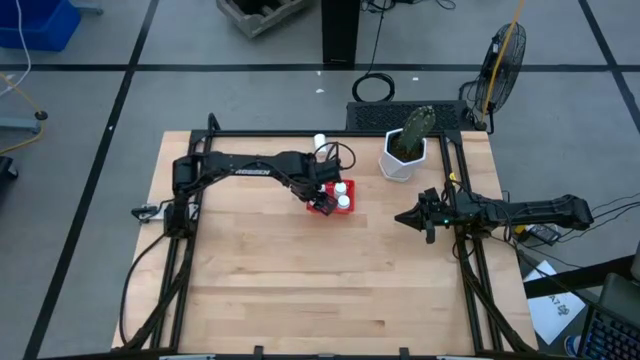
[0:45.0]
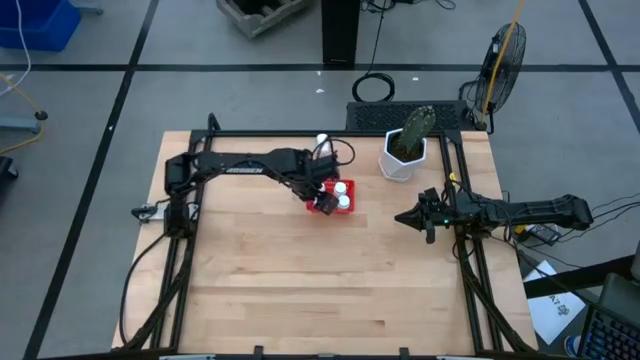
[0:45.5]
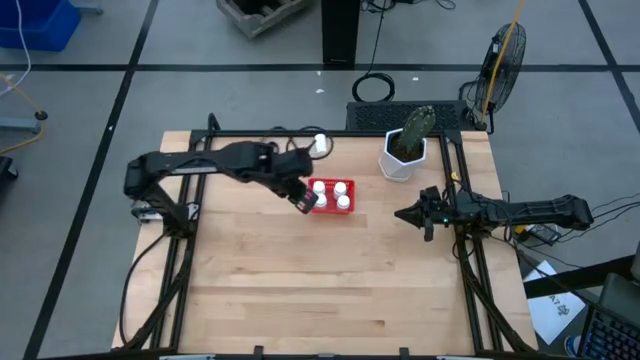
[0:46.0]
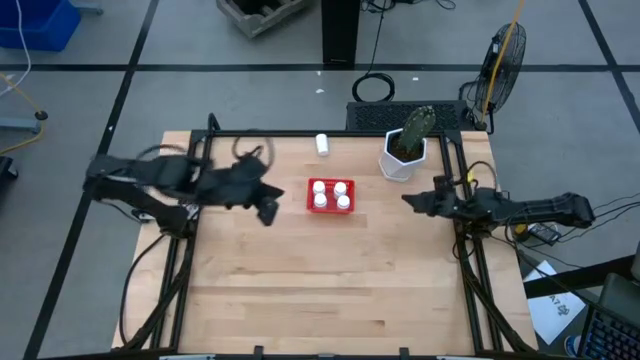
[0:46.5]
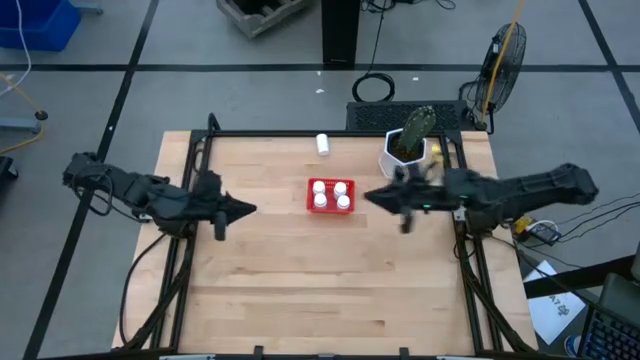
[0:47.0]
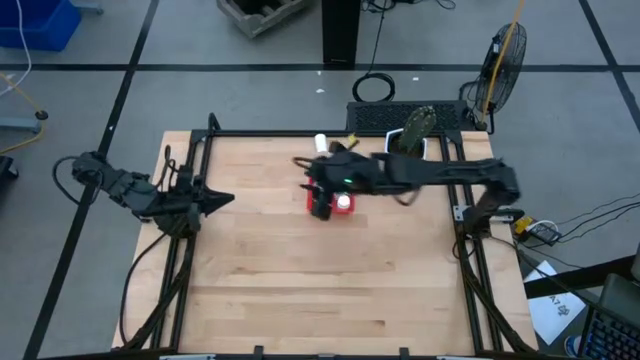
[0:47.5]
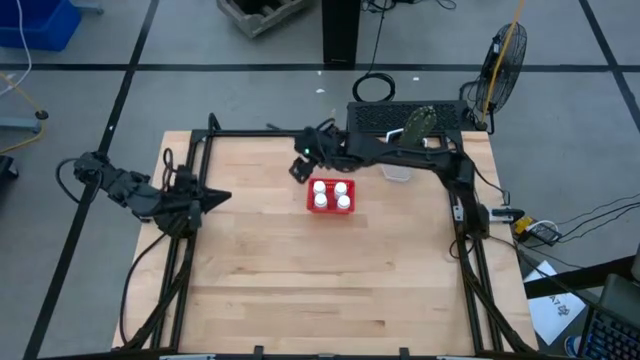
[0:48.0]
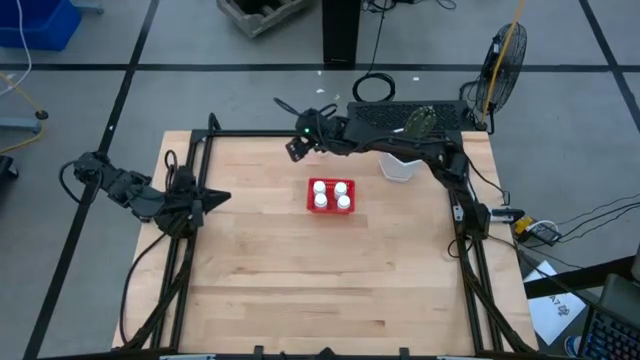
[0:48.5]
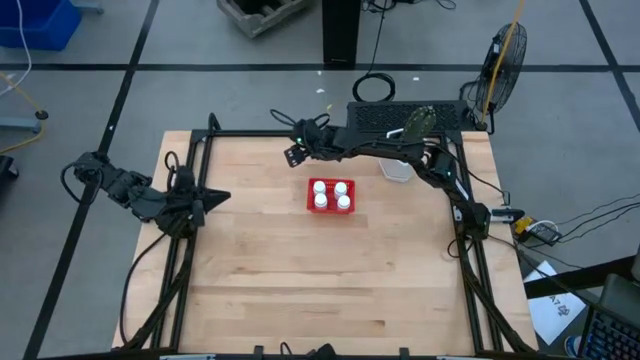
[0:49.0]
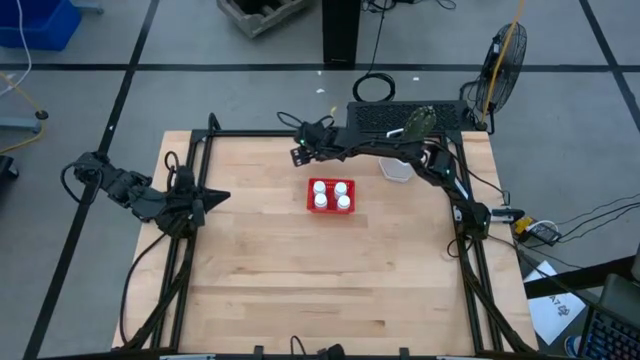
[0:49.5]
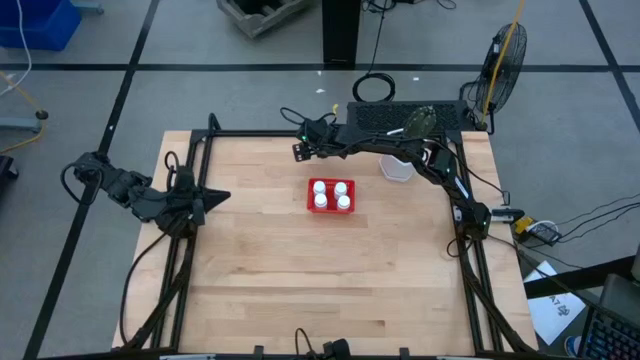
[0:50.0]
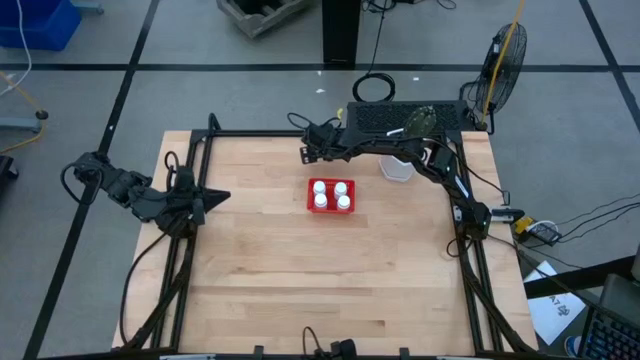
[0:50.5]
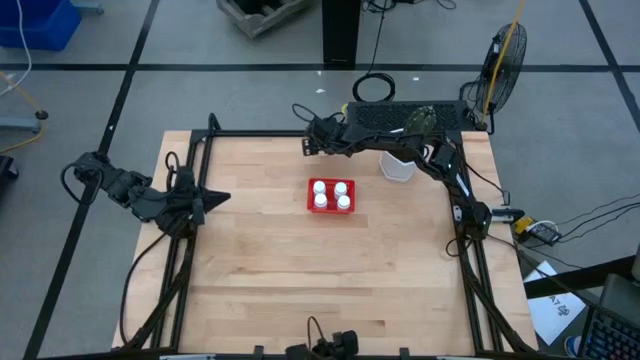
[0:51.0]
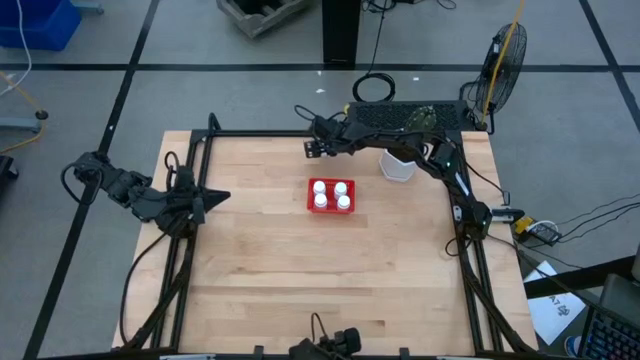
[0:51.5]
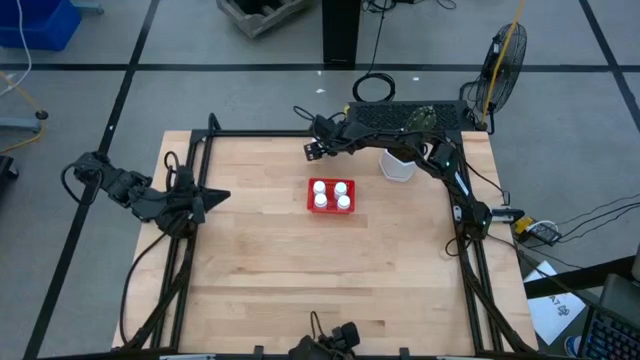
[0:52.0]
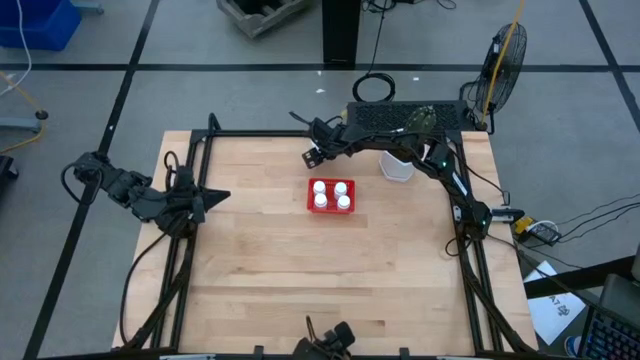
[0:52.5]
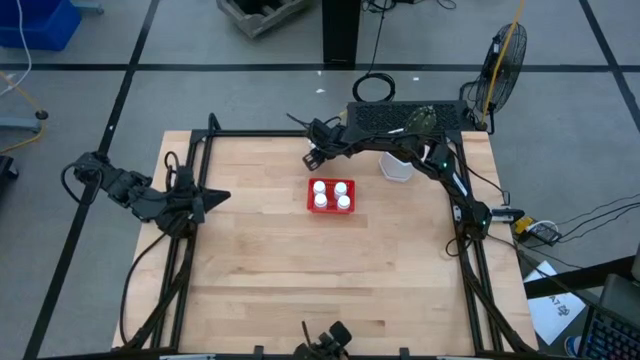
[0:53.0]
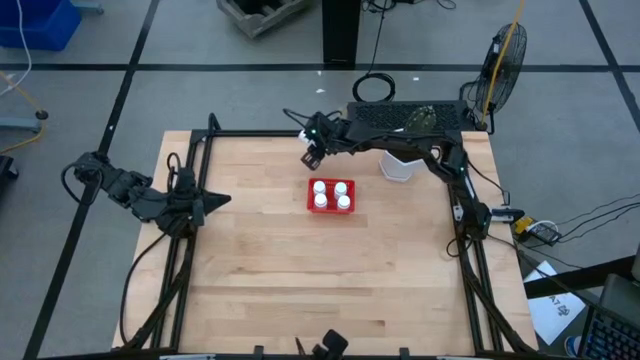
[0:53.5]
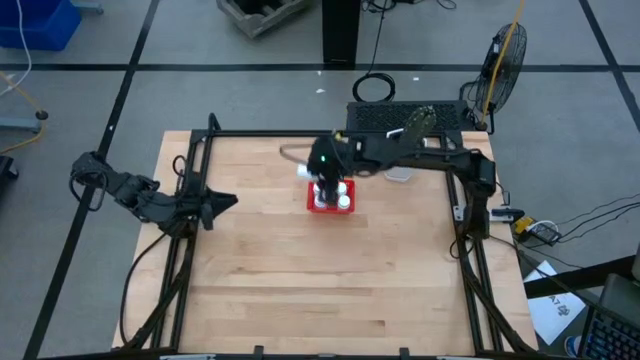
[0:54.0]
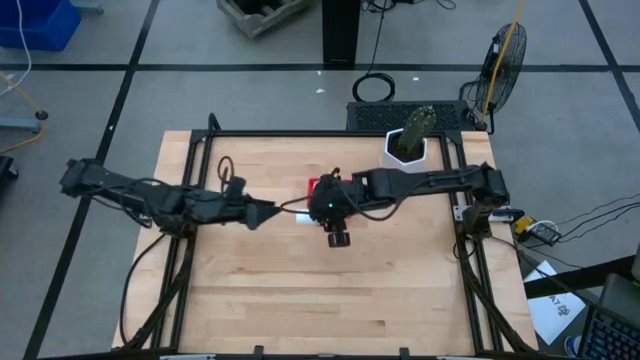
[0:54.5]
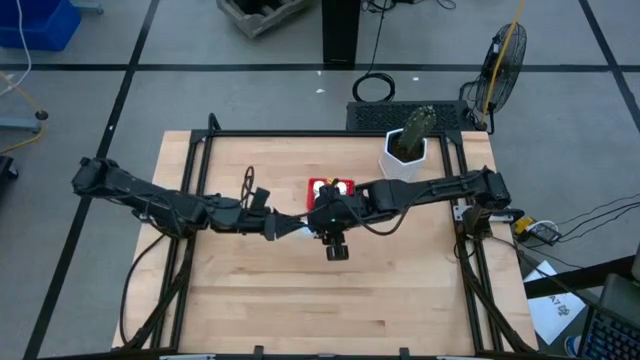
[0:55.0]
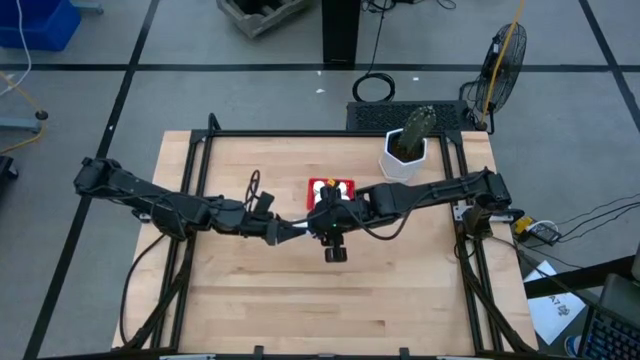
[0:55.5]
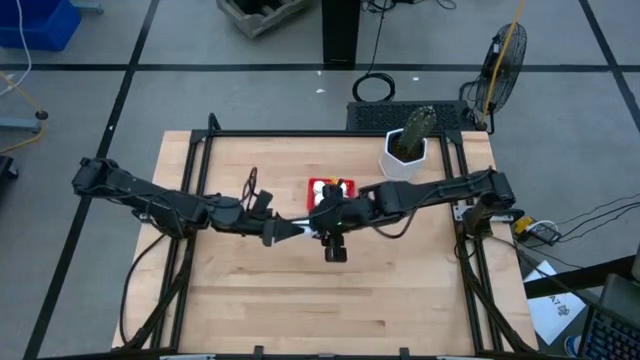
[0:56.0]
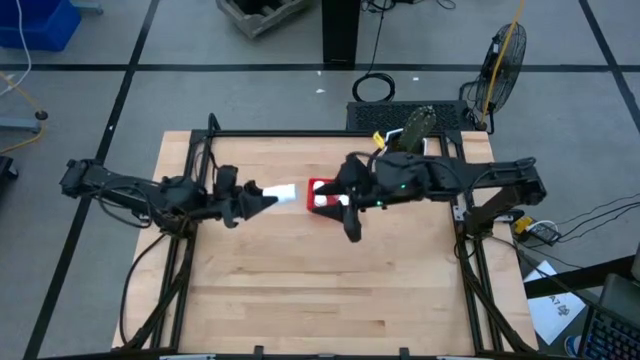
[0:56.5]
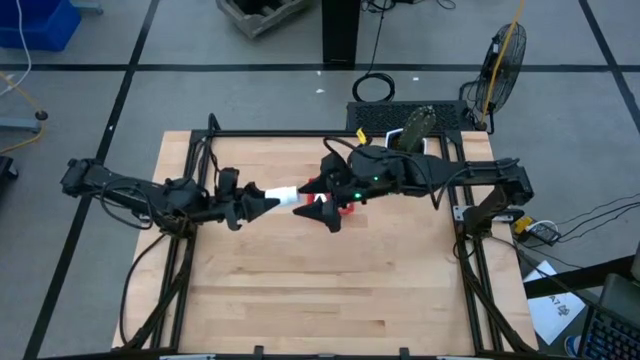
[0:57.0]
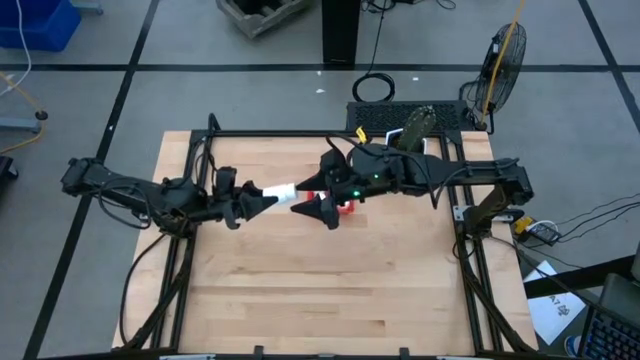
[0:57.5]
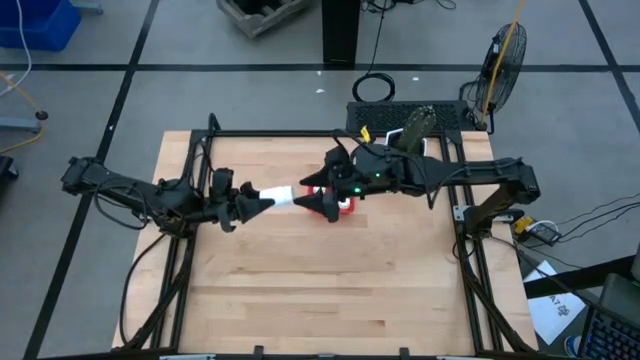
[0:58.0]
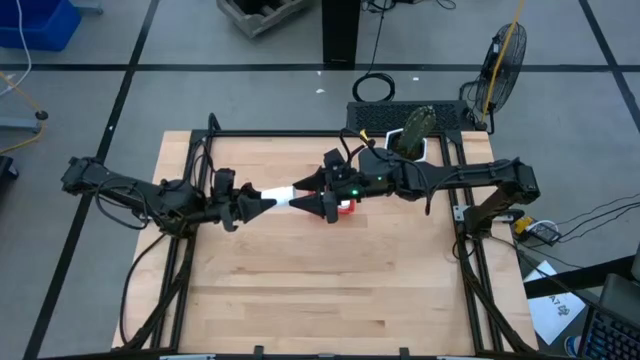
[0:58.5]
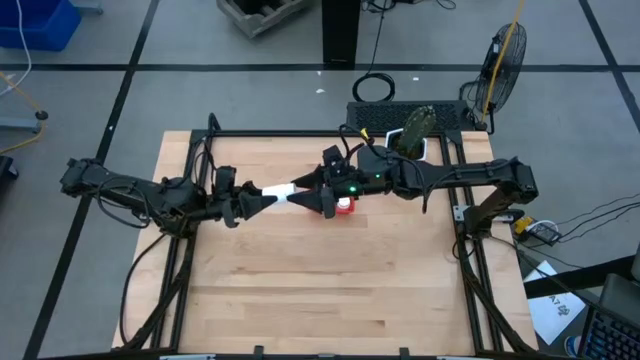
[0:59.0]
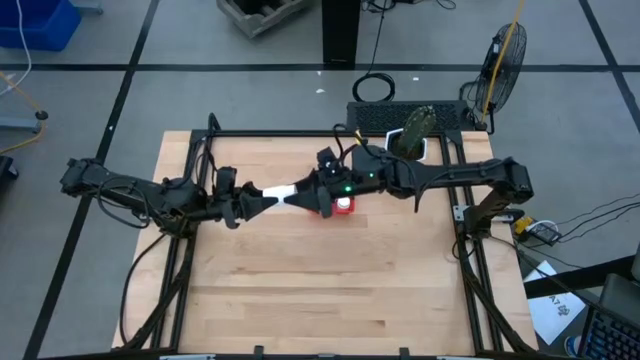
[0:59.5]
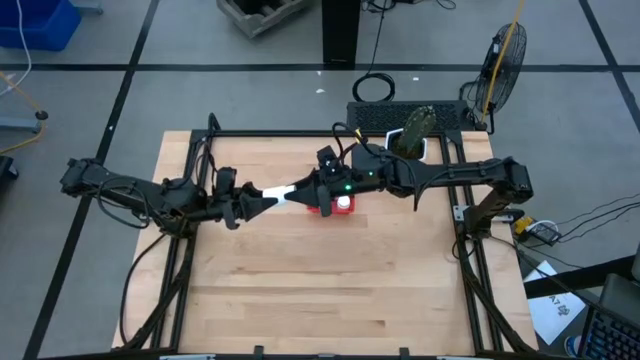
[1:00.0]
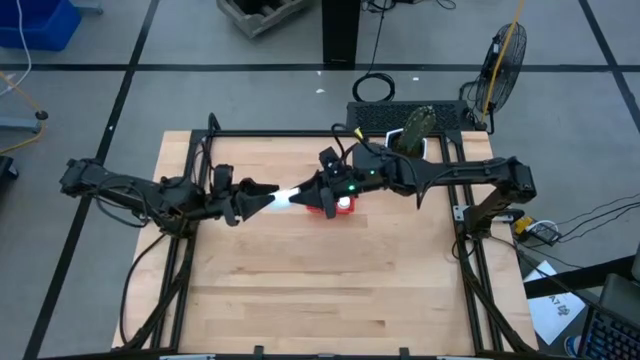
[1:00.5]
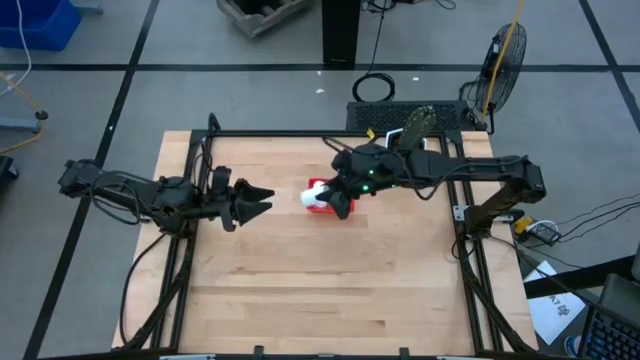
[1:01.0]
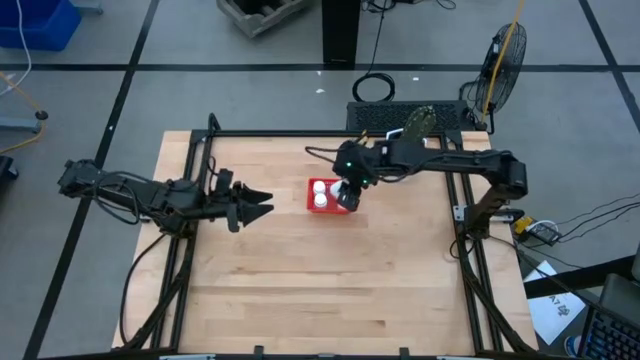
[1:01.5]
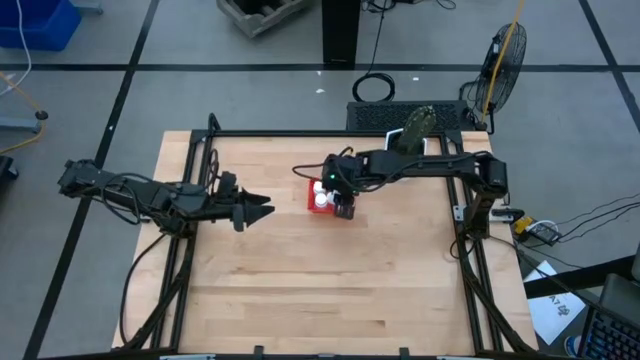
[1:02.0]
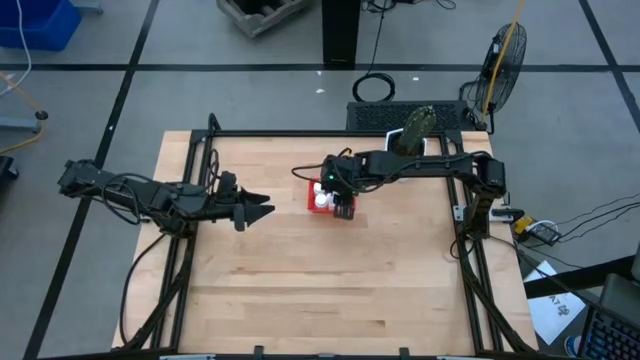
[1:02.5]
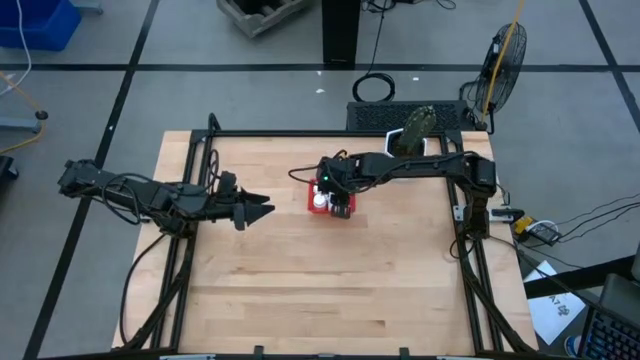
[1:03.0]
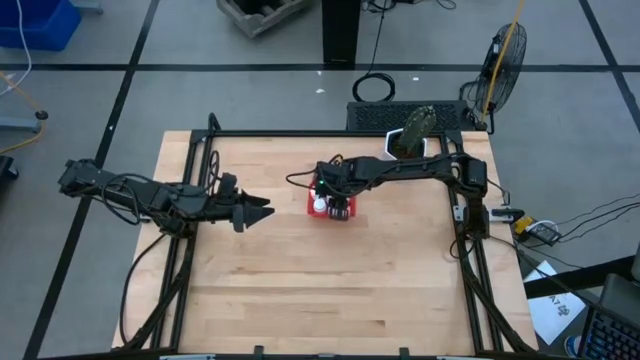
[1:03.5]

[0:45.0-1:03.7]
Task: Pick and place pill bottles into a basket
Put the white medicine bottle into the red basket

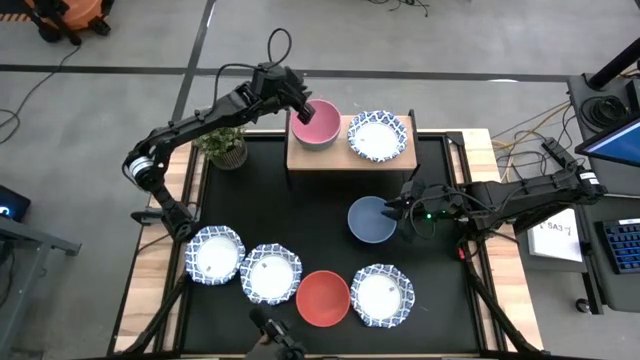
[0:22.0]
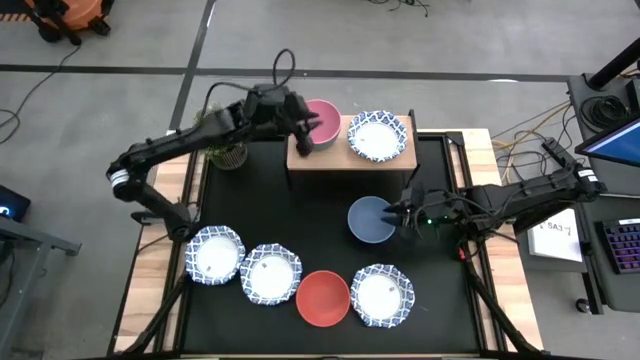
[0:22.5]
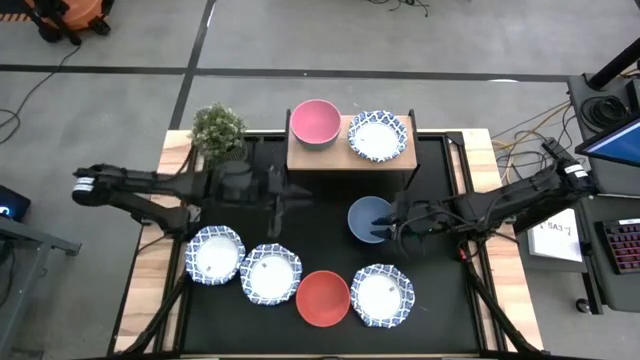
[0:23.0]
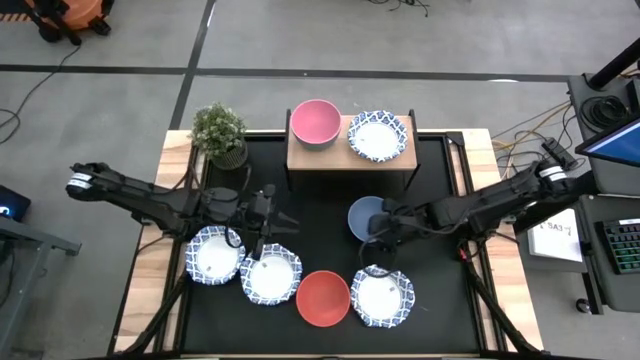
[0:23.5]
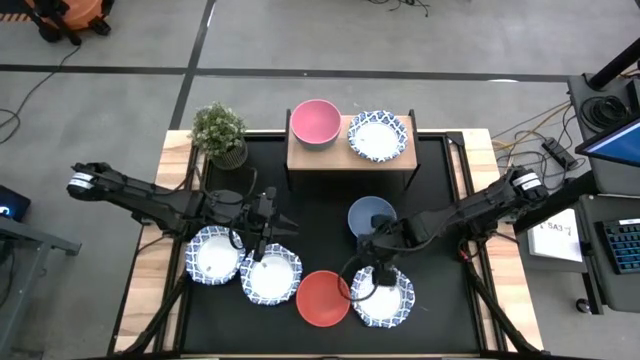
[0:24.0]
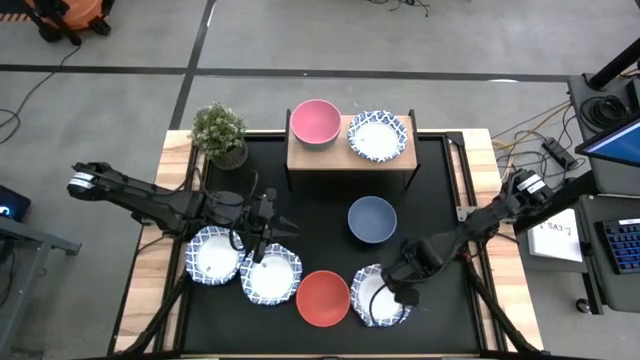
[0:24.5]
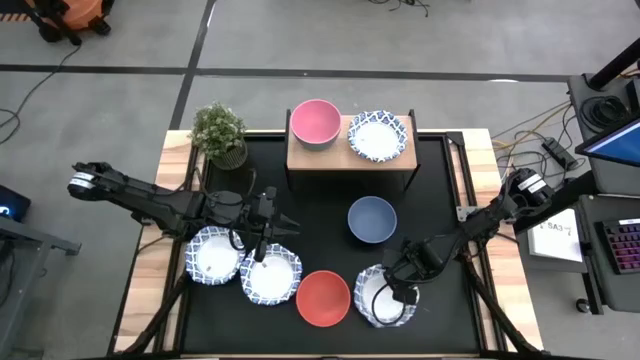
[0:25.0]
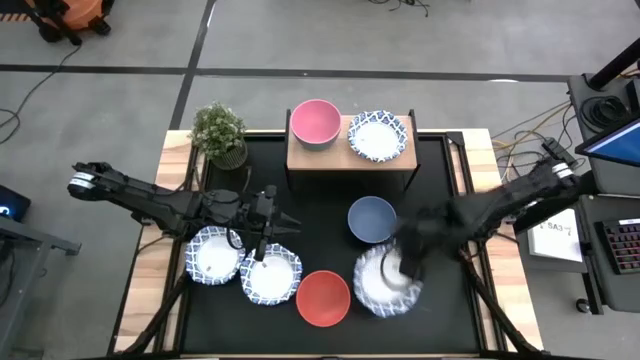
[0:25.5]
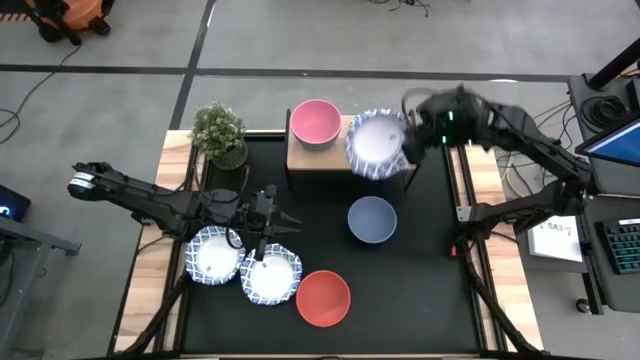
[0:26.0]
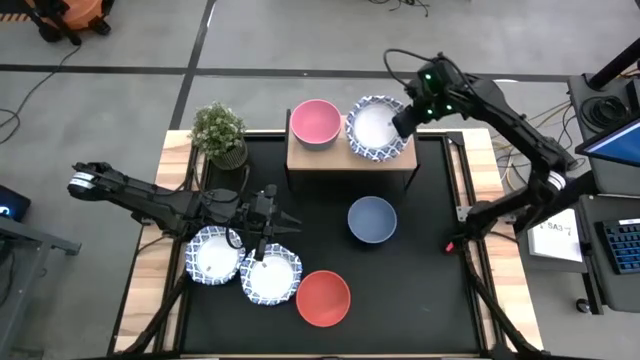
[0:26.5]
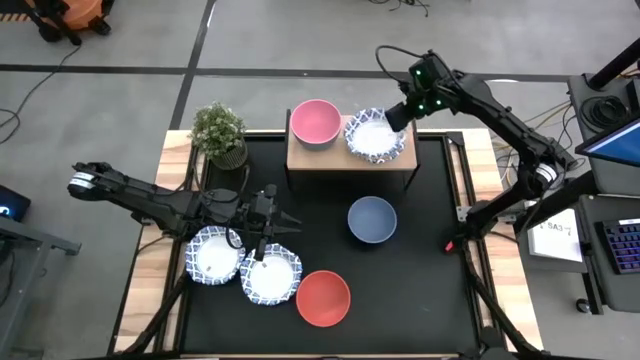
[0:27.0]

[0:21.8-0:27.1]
Task: Place and stack bowls onto a shelf
Stack the right white and blue paper plate on the white and blue paper plate on the shelf
